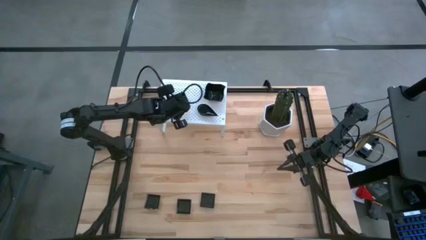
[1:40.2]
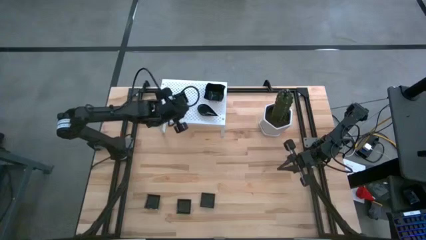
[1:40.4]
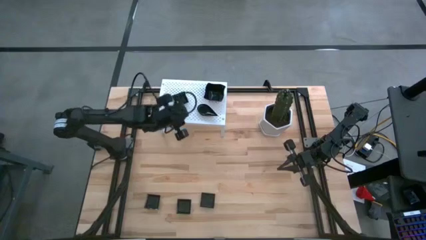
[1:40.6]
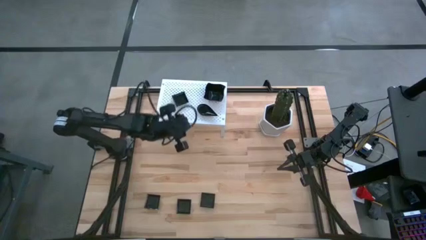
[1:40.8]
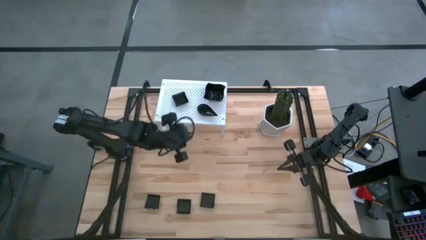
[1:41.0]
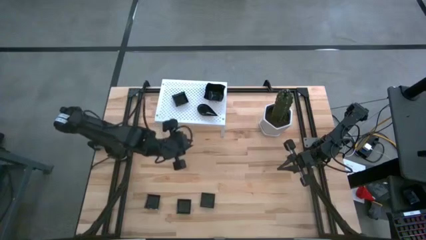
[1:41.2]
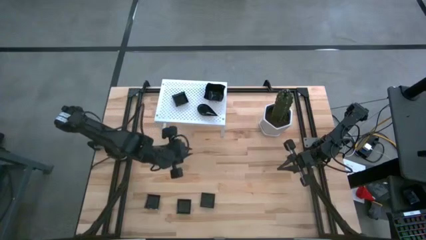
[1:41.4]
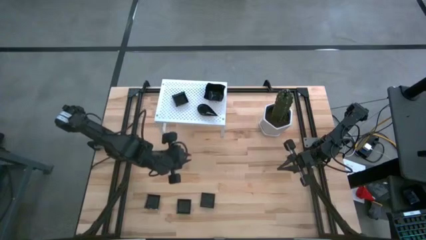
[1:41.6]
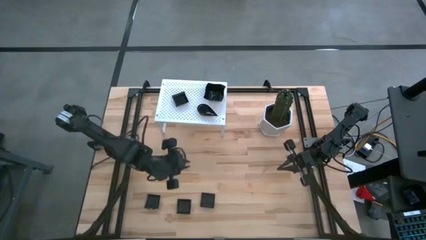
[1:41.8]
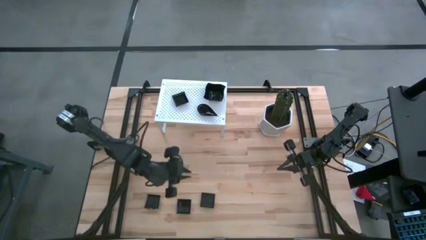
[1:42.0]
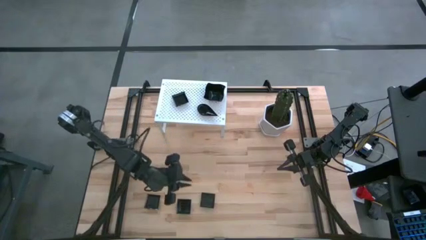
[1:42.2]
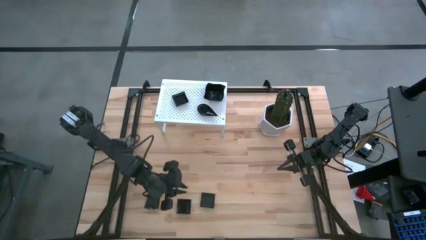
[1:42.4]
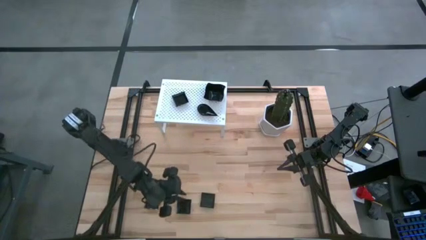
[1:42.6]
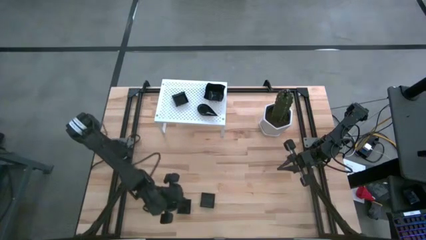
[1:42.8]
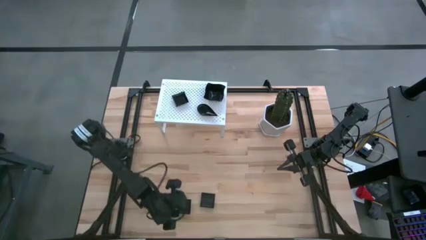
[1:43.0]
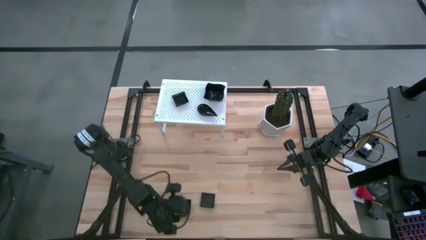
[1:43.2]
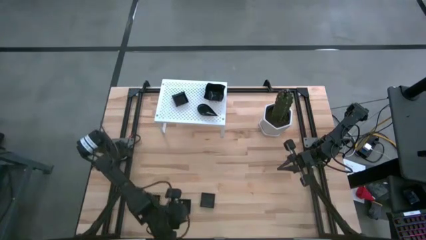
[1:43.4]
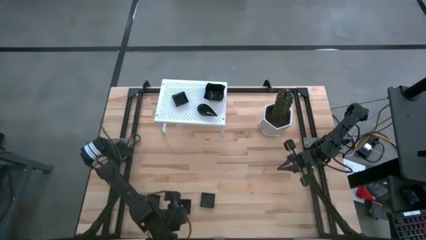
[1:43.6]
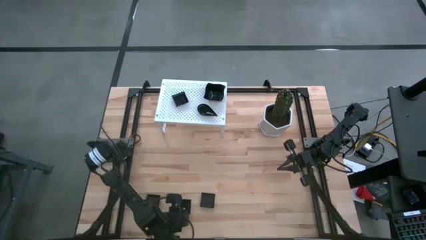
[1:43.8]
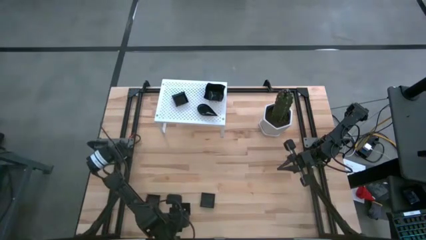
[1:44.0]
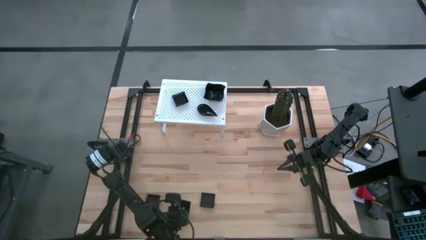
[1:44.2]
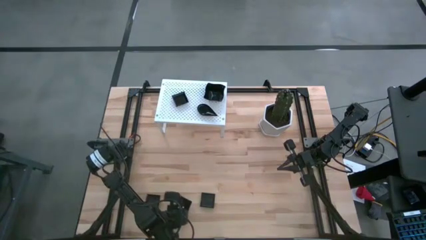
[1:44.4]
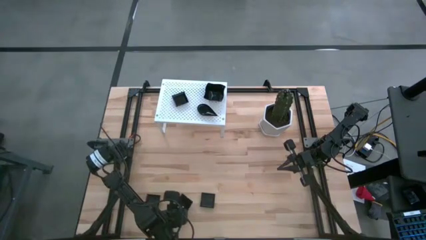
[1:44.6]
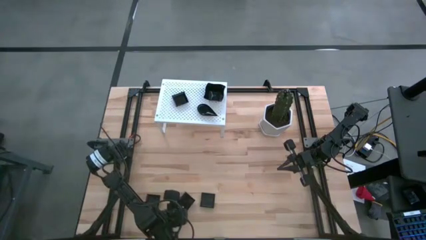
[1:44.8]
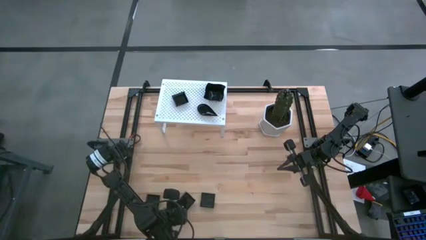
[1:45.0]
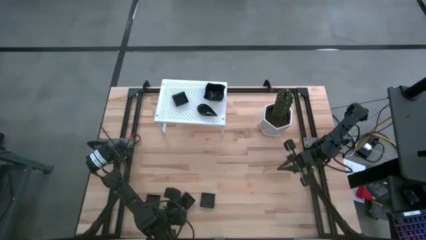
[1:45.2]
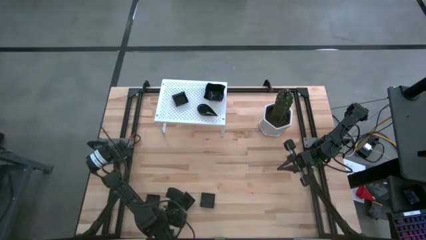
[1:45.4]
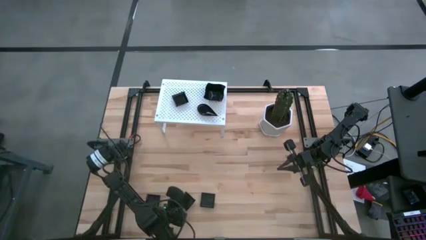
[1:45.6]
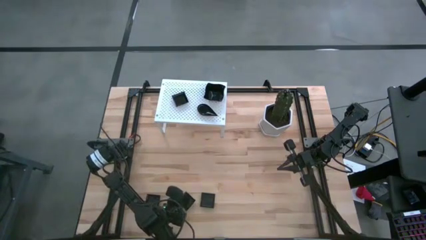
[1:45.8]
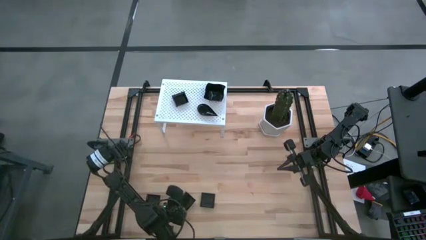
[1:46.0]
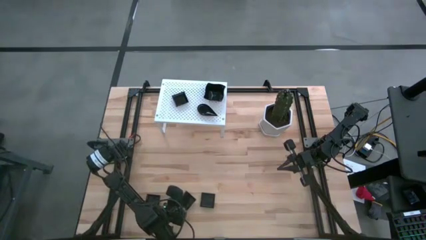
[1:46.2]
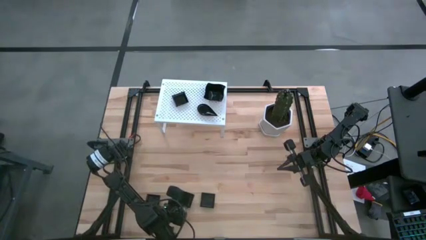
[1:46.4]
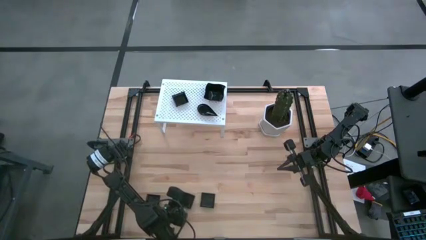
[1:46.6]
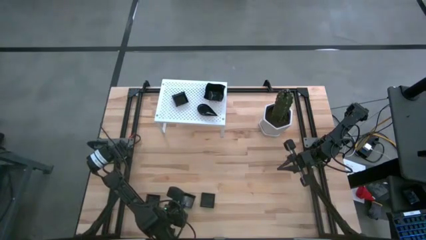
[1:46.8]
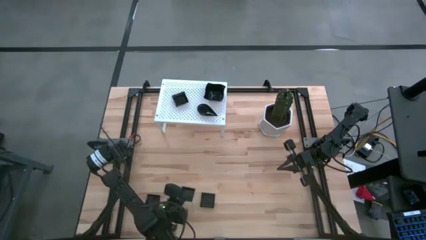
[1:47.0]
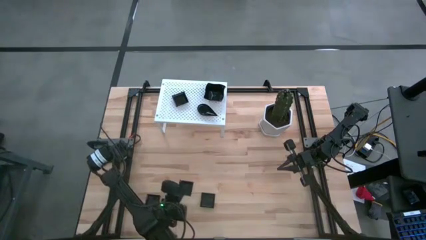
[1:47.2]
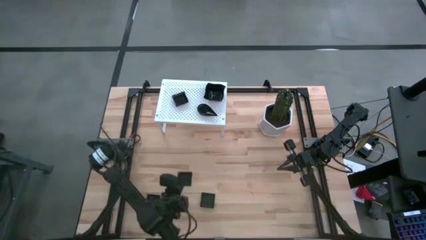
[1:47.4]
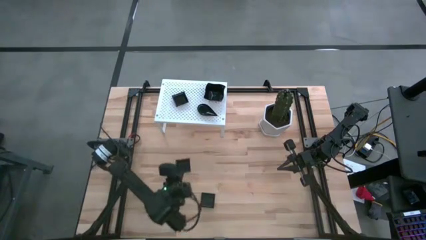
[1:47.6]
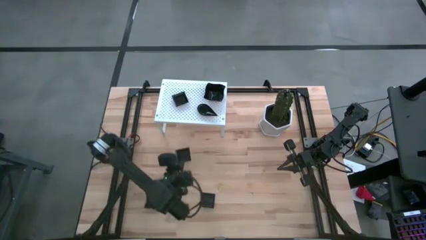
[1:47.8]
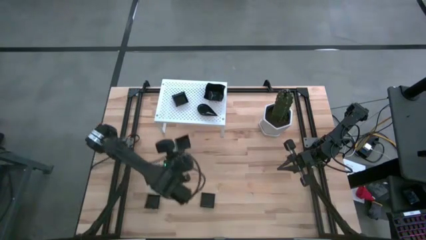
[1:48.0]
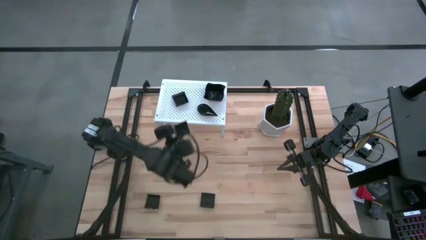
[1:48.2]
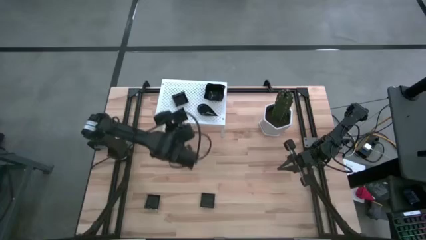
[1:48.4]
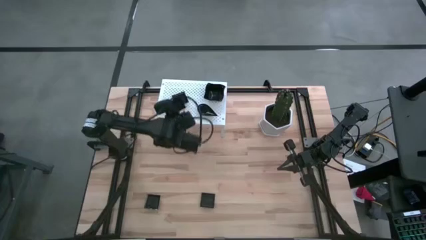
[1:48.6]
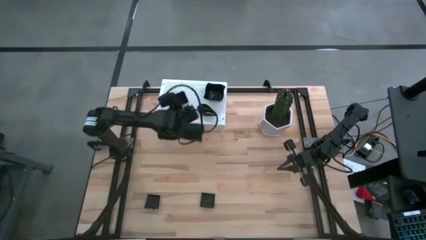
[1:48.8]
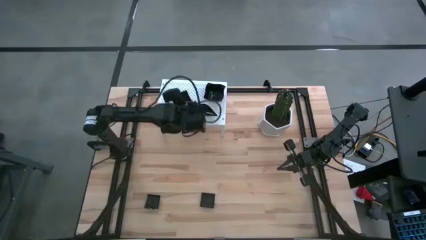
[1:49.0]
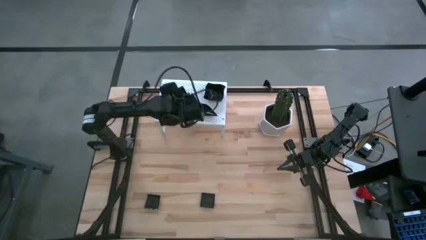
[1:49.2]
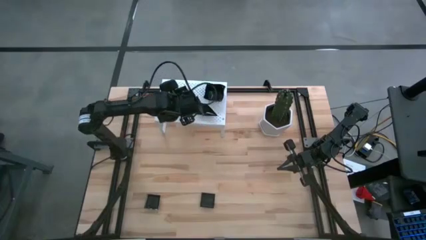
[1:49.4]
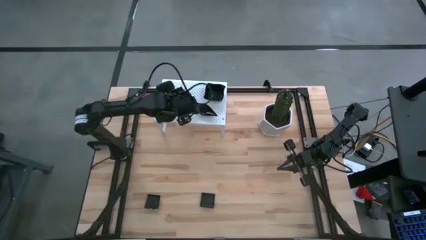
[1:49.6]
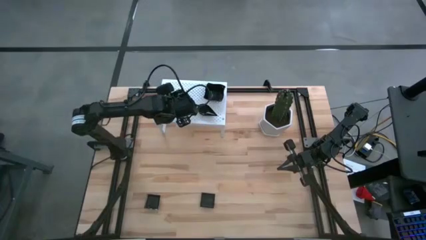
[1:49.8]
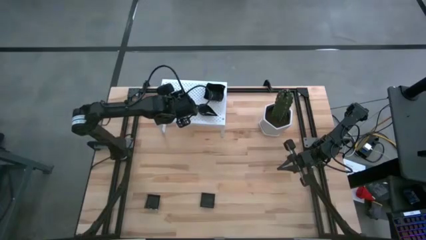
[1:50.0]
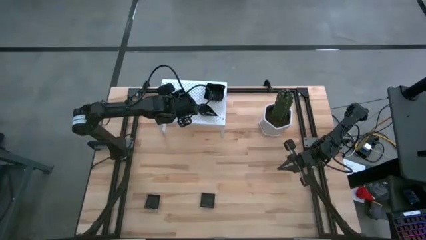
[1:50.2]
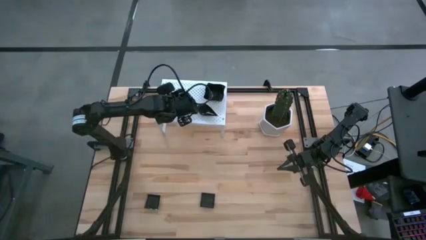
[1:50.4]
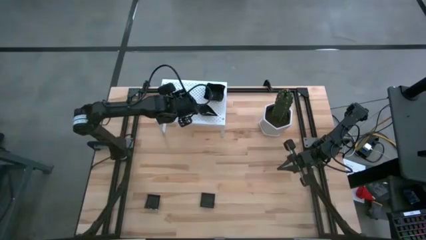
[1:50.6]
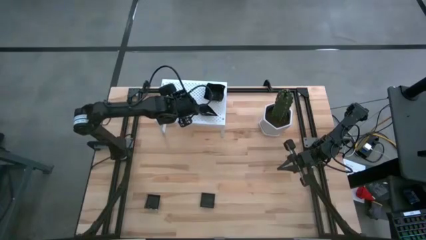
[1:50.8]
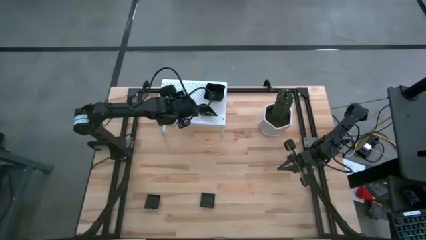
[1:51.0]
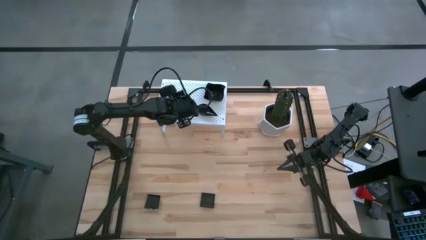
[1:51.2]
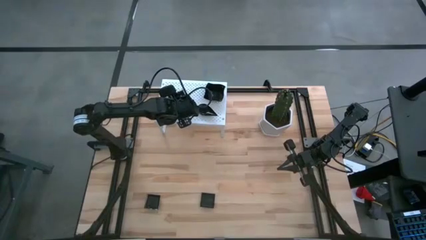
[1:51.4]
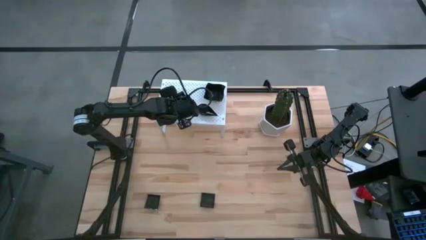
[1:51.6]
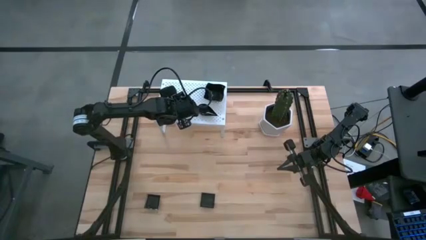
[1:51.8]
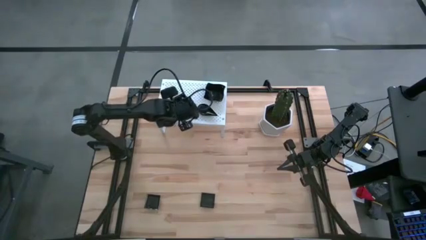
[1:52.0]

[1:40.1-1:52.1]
Task: Pick & Place Mini shaped plates
Stack the square plate on top of the other square plates on the shelf

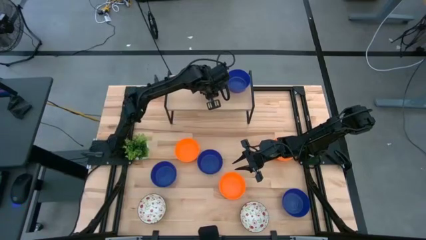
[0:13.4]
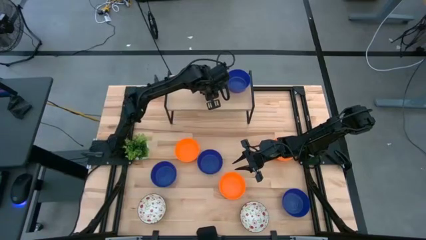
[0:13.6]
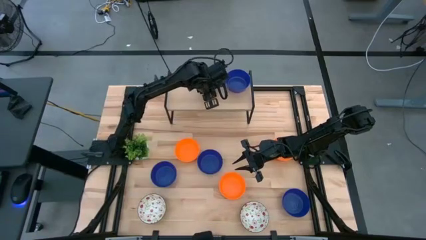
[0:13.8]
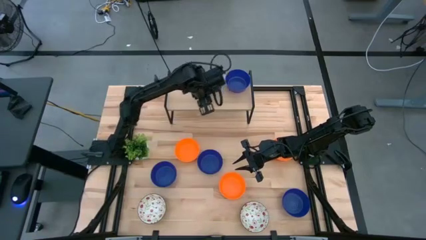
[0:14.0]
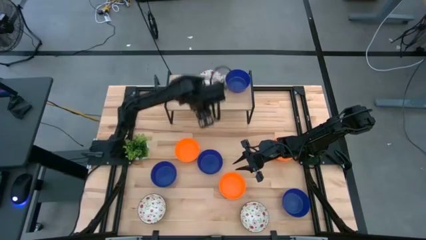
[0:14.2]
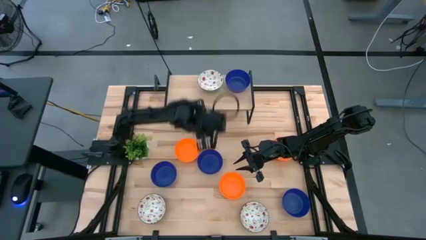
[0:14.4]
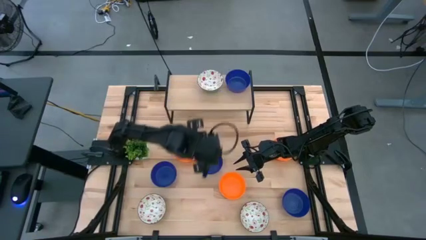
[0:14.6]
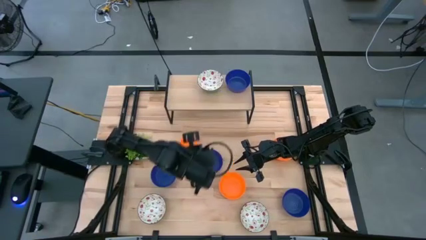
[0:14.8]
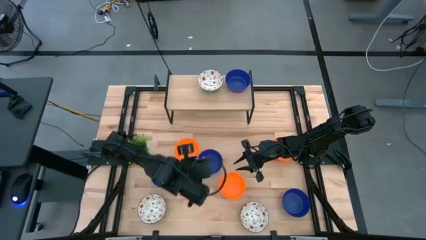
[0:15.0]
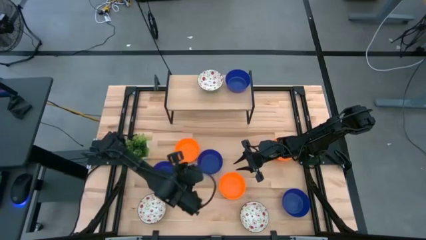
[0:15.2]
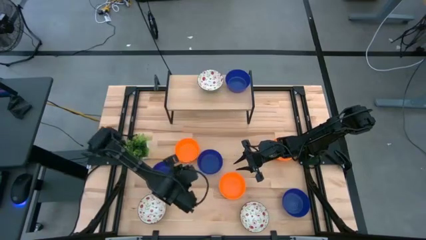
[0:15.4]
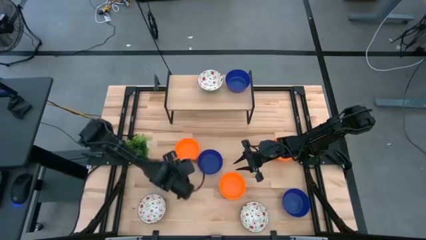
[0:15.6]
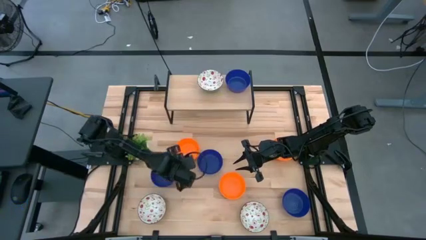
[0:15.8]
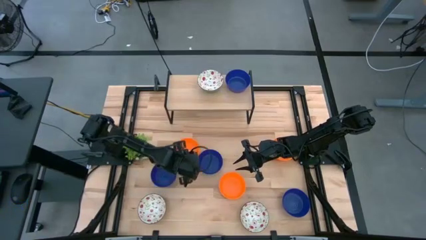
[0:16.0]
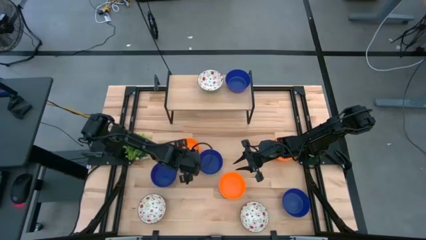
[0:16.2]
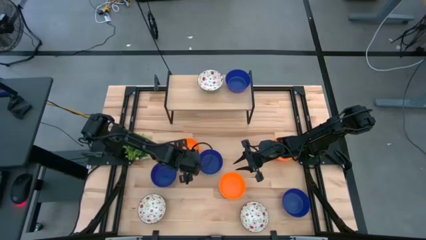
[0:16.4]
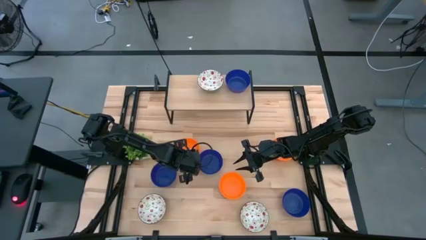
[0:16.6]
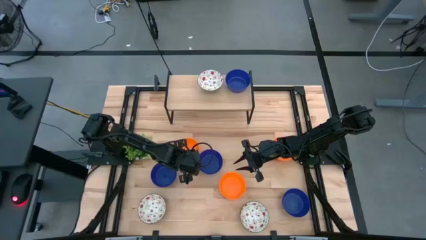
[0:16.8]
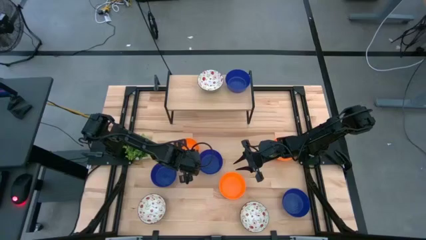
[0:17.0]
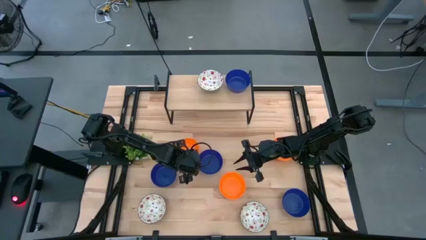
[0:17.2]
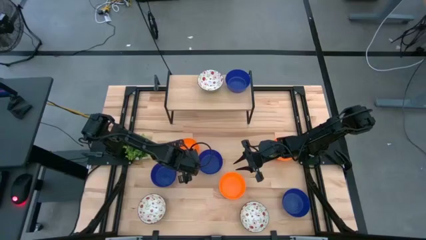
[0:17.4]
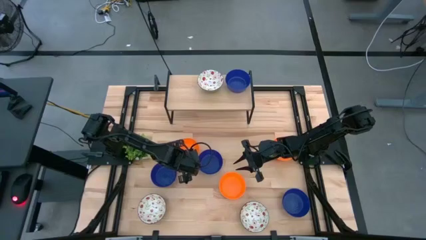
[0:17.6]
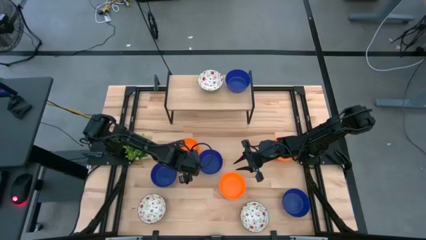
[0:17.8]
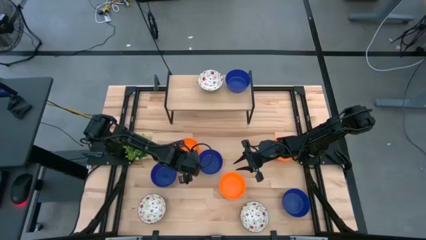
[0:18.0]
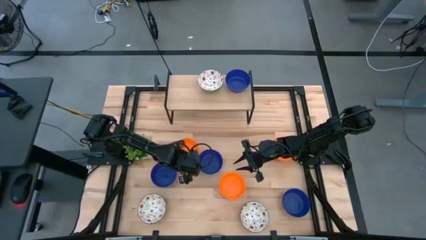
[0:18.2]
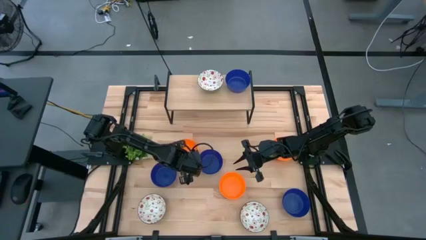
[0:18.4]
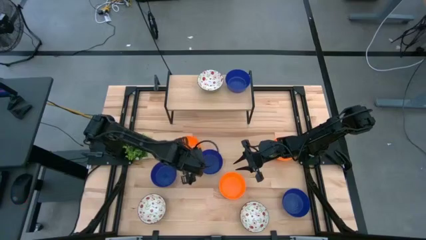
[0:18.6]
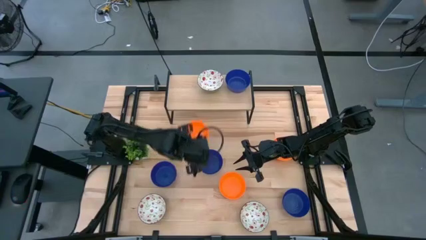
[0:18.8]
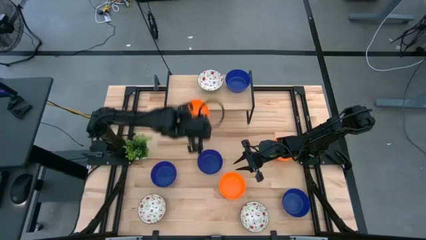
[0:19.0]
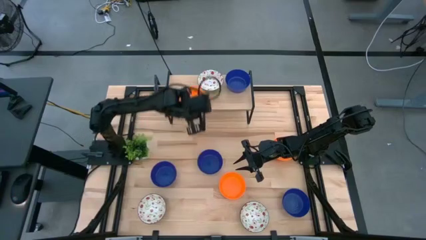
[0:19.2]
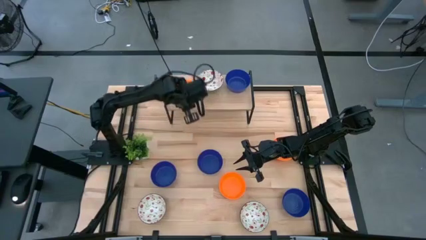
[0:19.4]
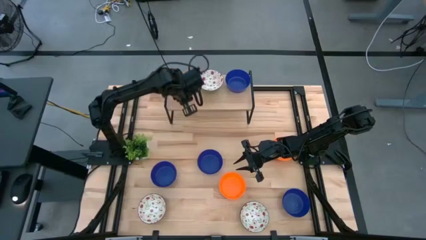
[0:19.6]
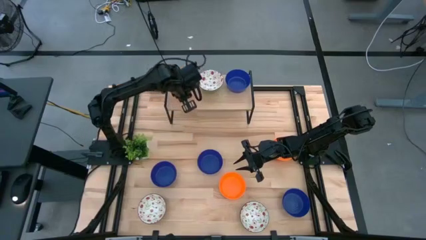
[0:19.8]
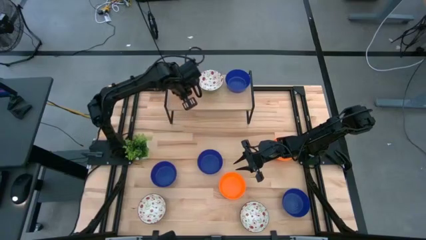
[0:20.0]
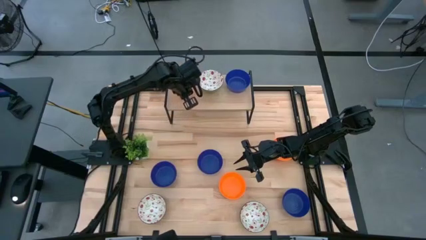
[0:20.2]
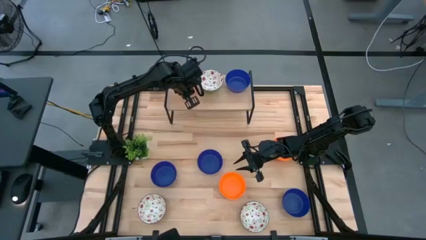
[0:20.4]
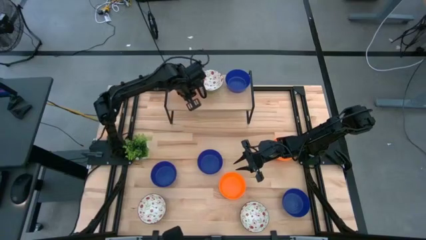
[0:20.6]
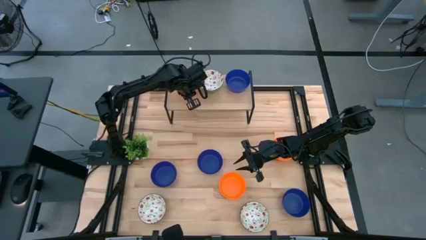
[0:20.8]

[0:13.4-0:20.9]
Task: Pick & Place Mini bowls
Put the orange bowl on the shelf
